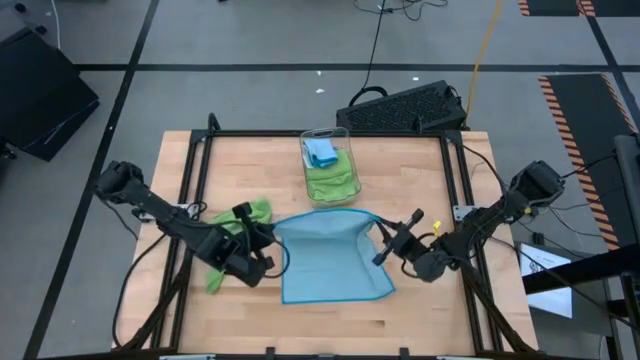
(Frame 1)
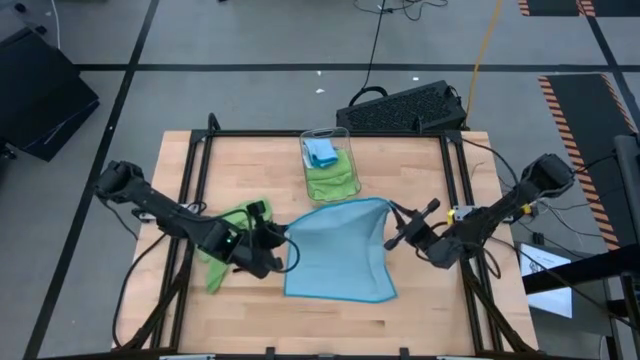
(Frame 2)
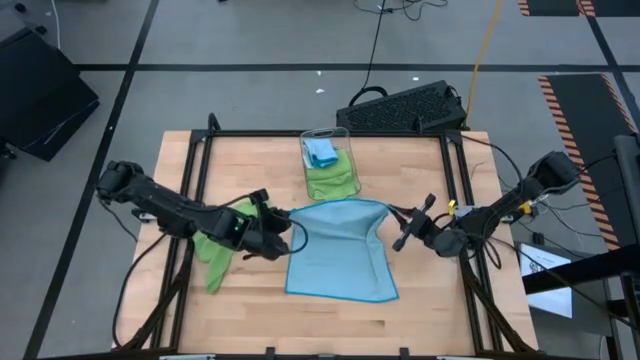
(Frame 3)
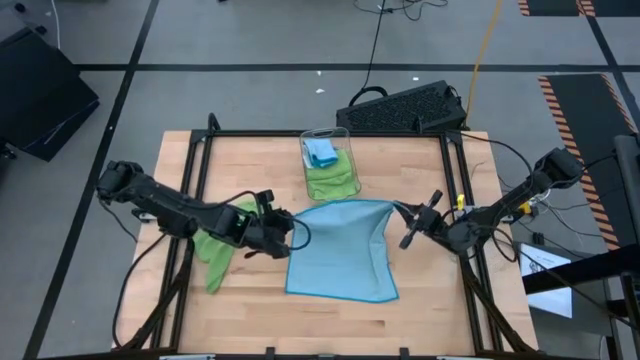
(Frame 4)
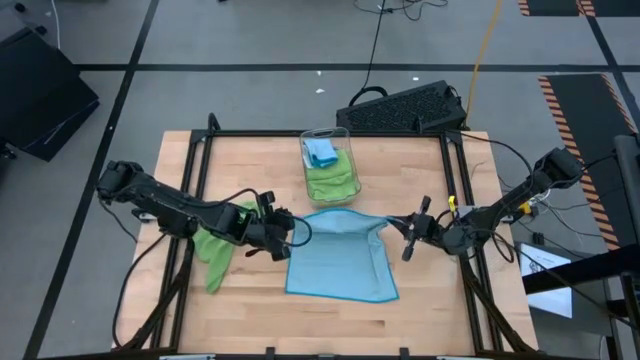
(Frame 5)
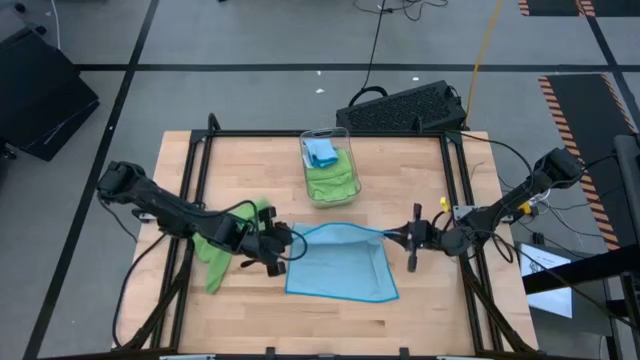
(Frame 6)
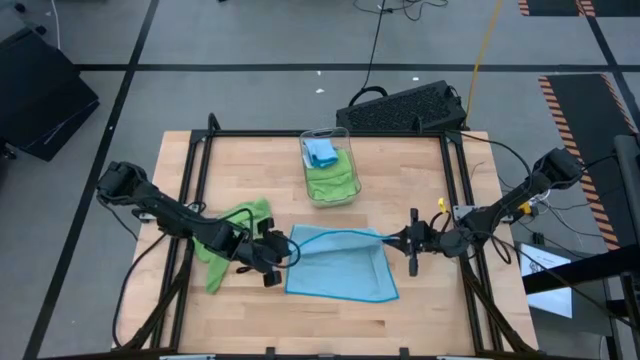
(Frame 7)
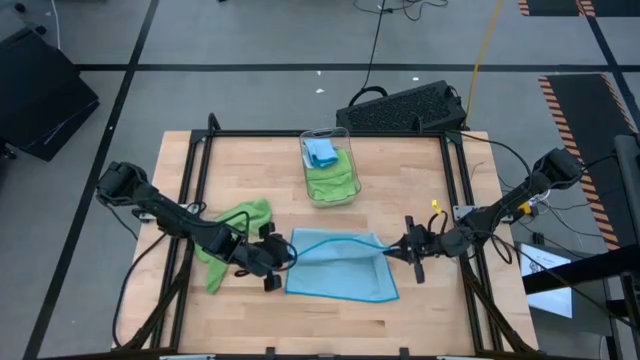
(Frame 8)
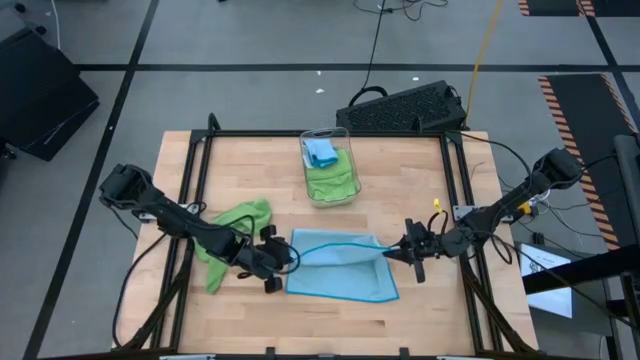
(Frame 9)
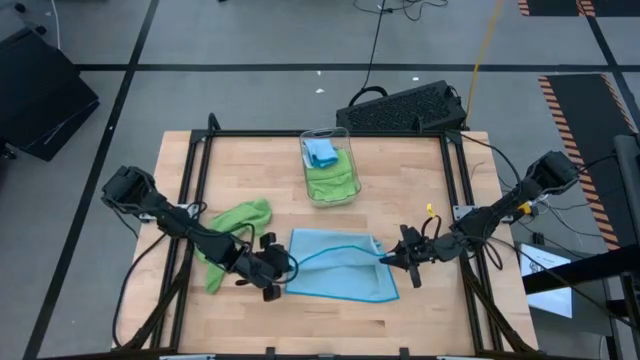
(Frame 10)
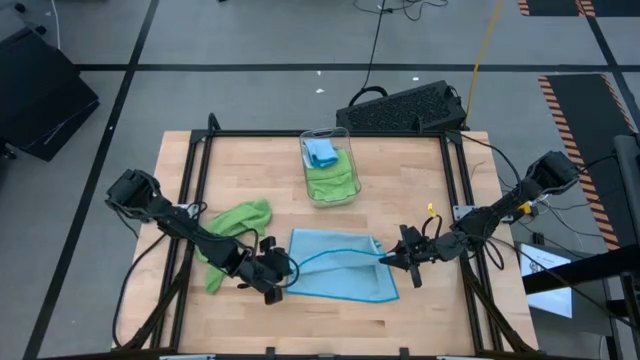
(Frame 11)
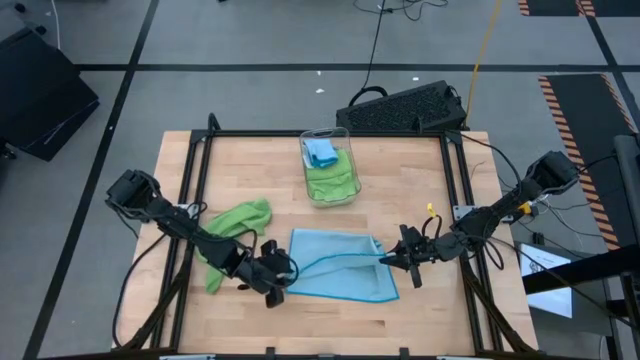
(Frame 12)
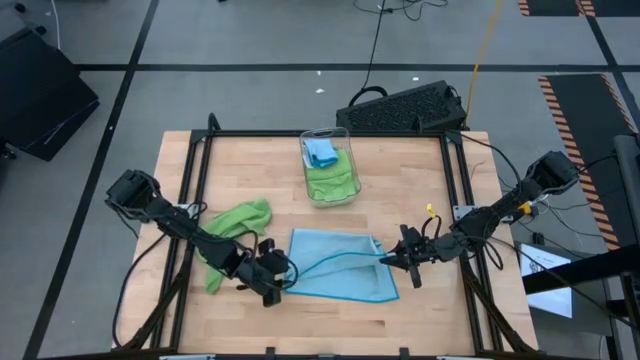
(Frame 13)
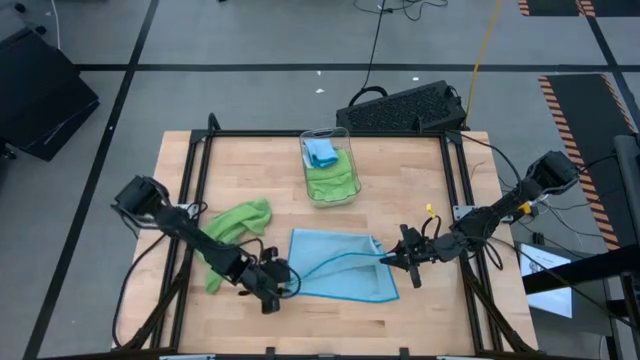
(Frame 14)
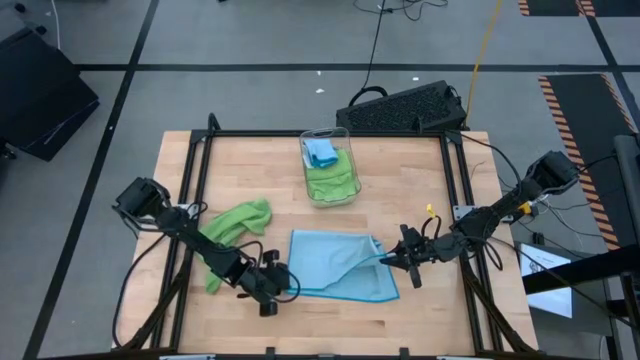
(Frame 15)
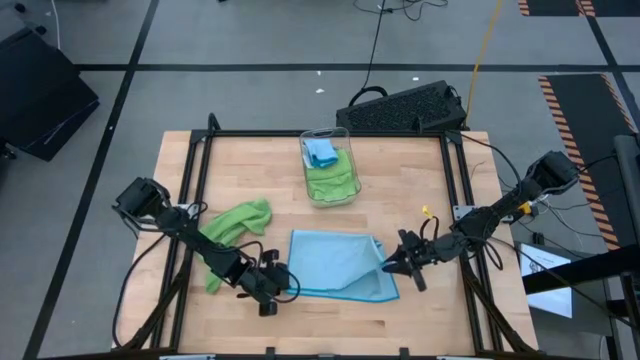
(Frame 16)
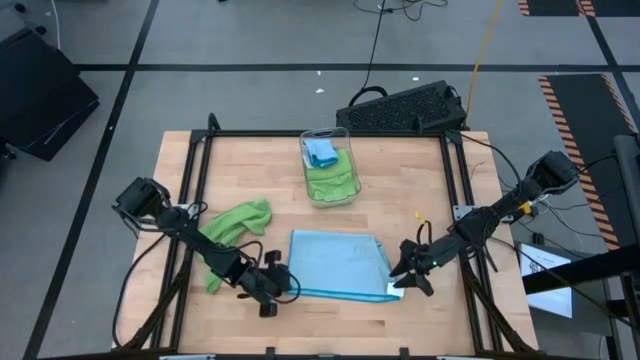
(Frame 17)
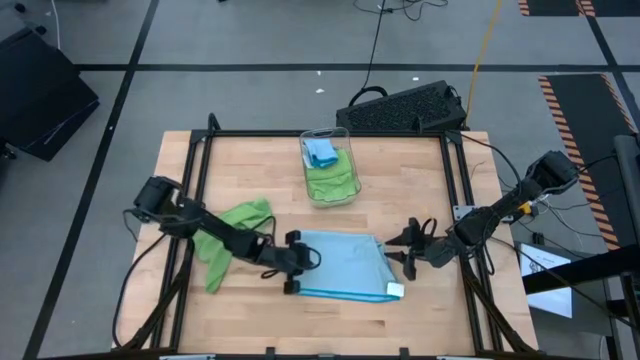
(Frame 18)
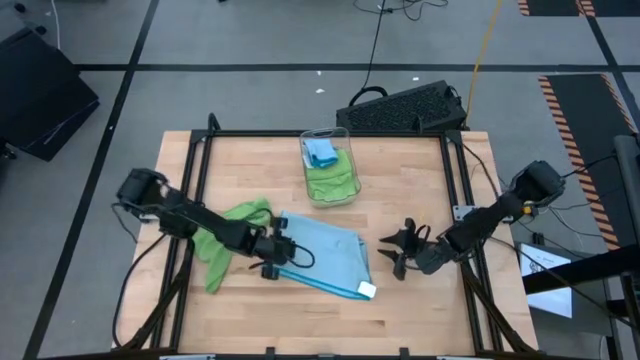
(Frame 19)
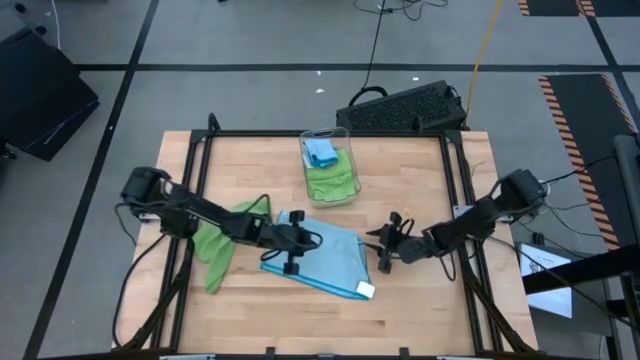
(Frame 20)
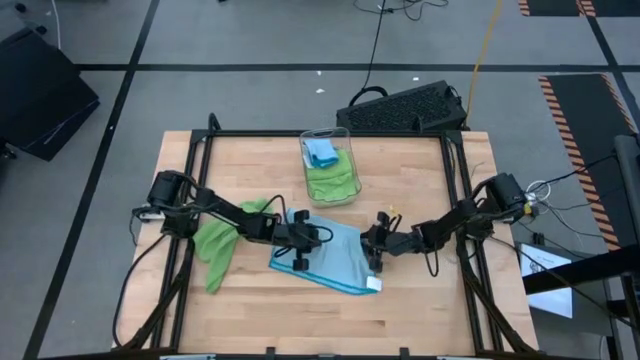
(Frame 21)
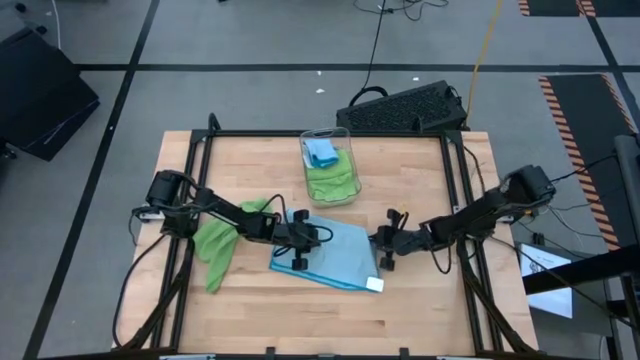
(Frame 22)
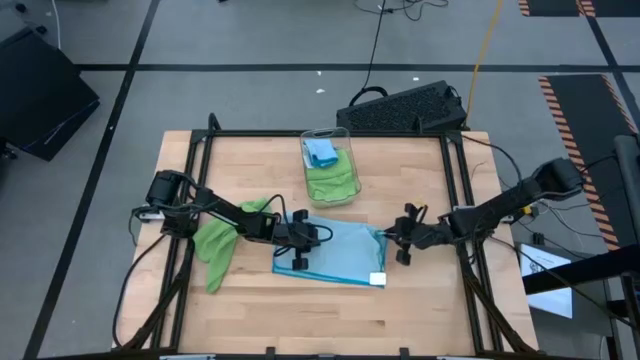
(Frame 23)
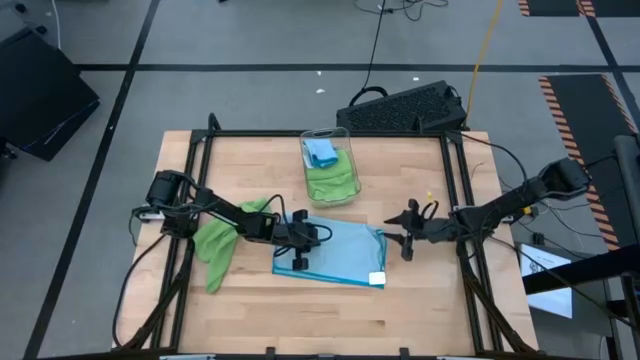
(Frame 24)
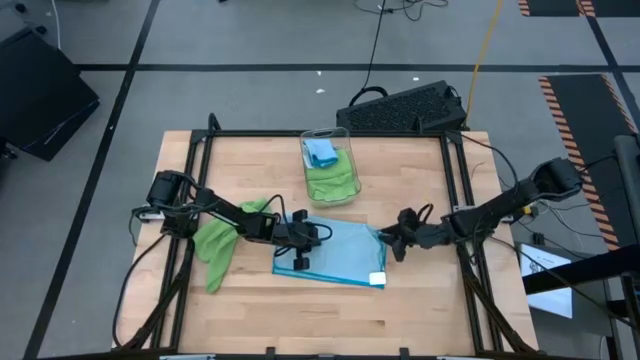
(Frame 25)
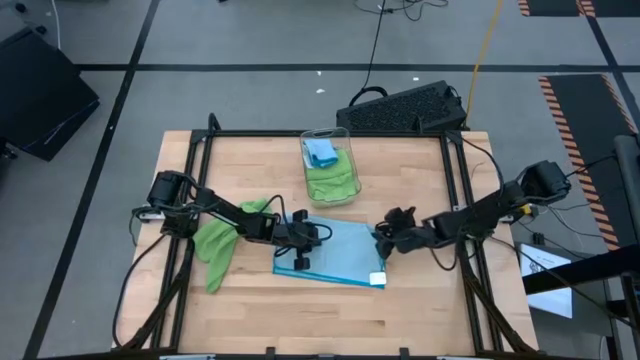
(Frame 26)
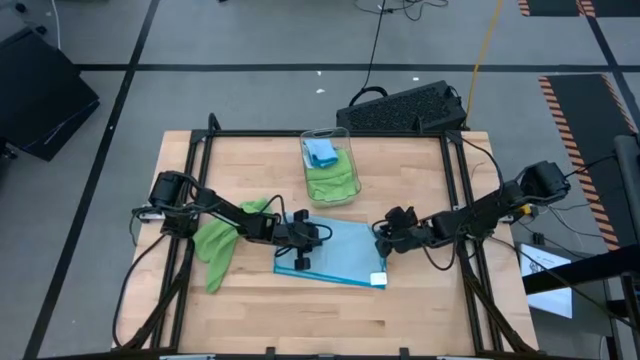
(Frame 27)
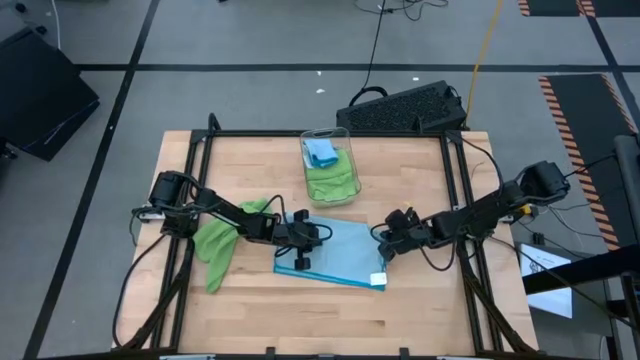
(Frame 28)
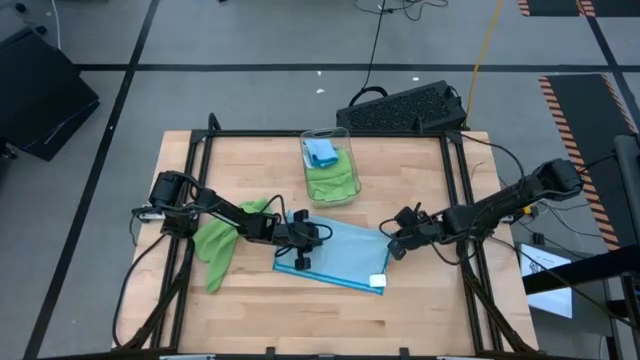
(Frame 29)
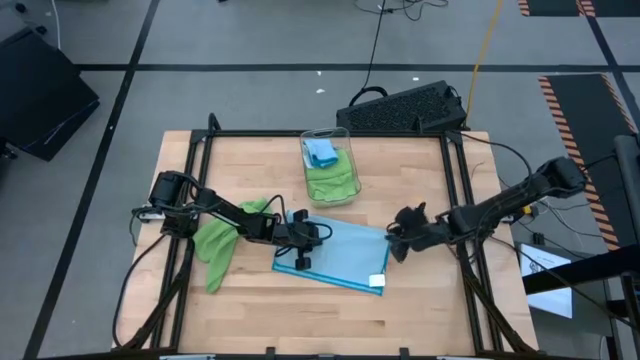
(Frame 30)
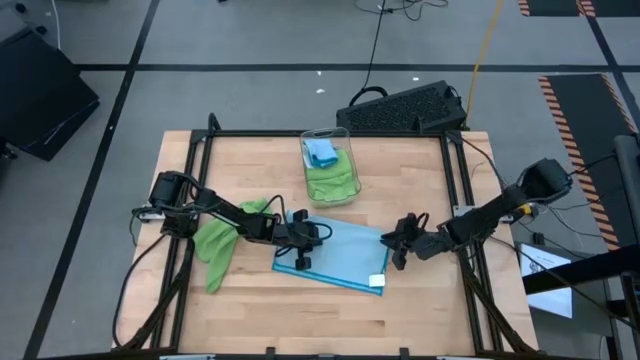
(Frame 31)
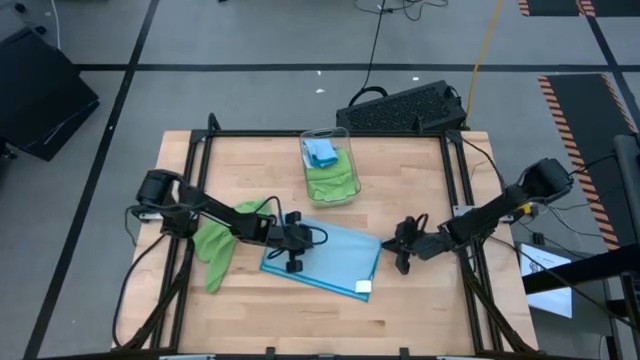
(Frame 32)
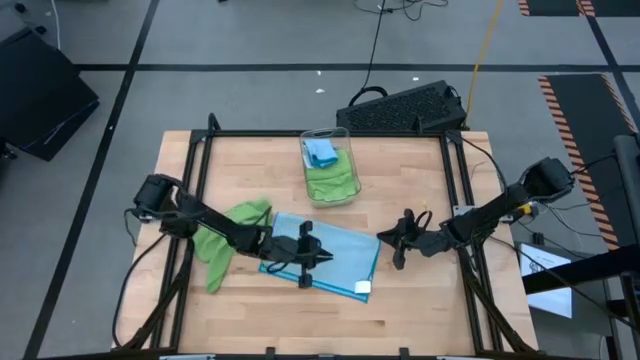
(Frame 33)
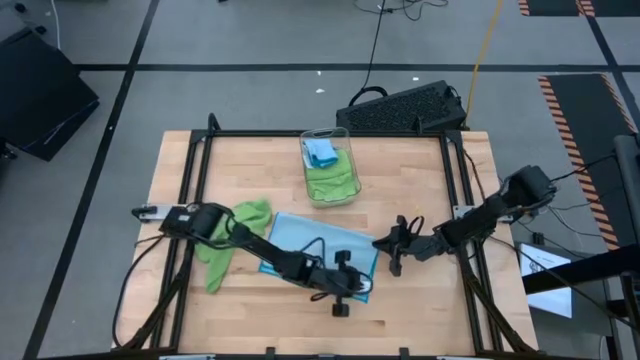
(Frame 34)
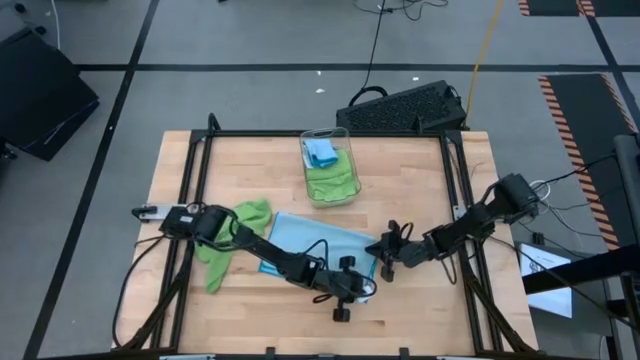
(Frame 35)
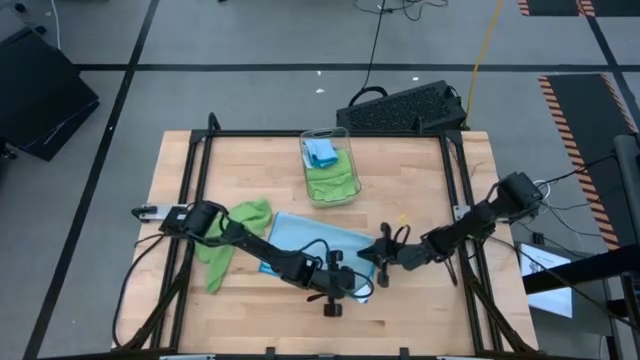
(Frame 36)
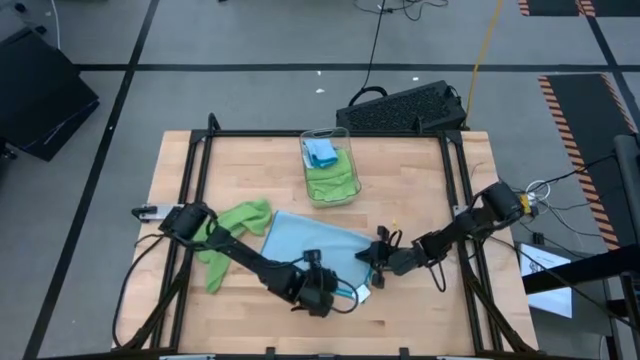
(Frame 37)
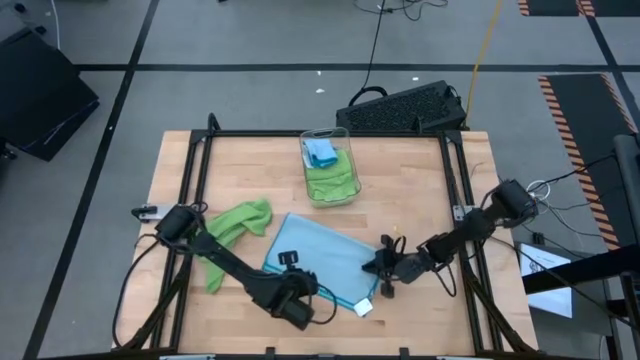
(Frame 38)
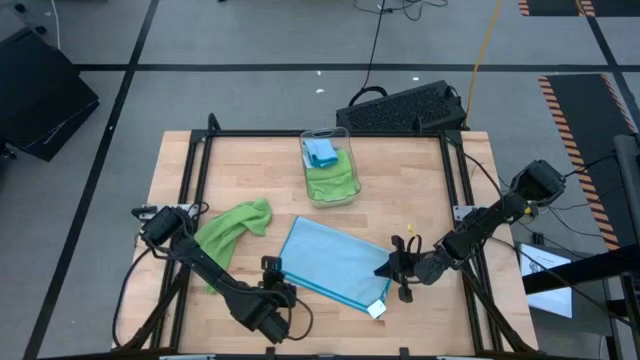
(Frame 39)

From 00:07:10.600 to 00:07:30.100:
Task: Fold microfiber towels
Fold the blue towel
